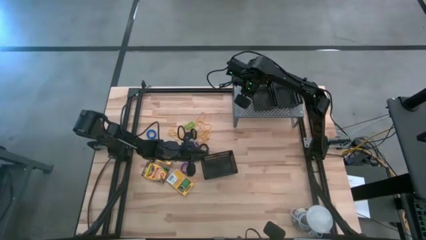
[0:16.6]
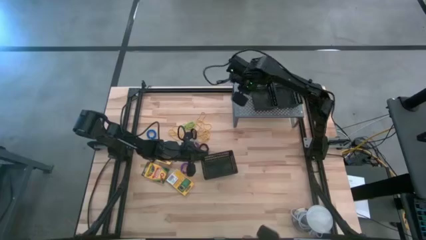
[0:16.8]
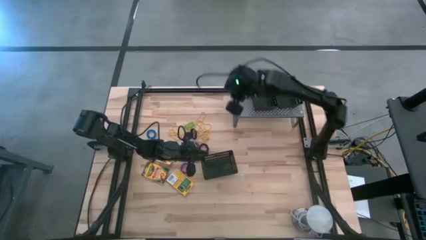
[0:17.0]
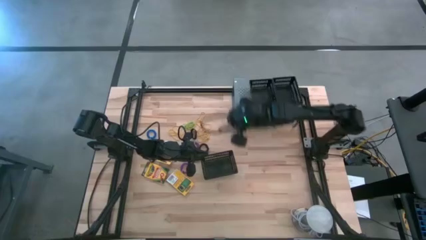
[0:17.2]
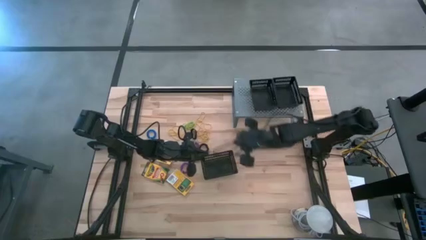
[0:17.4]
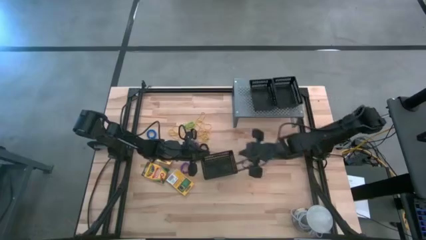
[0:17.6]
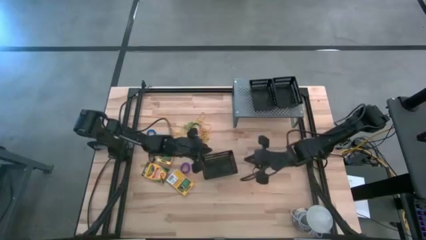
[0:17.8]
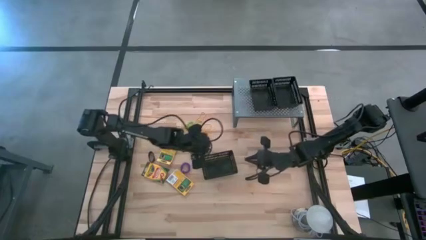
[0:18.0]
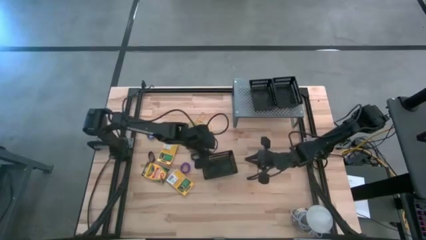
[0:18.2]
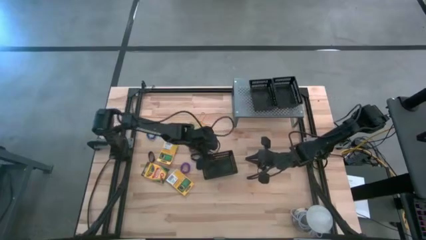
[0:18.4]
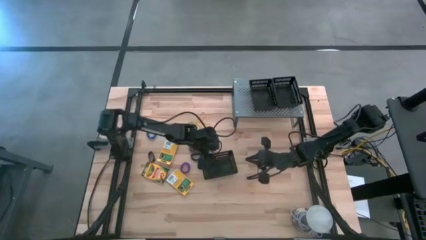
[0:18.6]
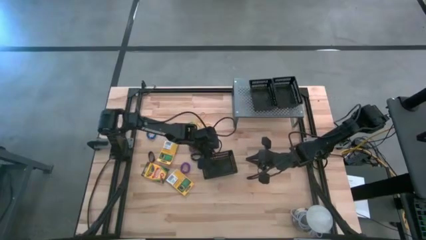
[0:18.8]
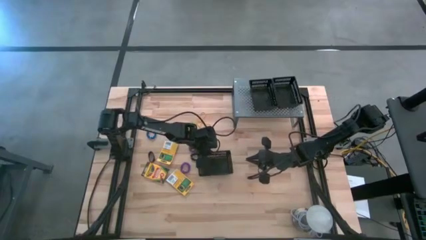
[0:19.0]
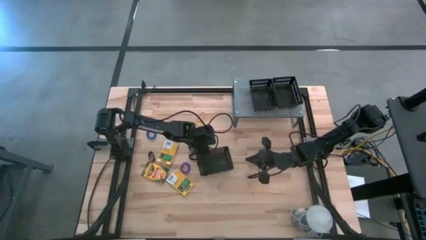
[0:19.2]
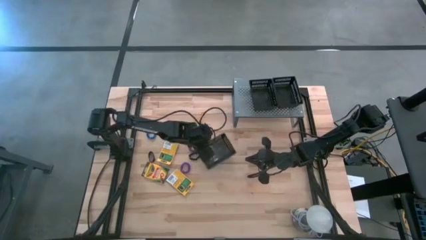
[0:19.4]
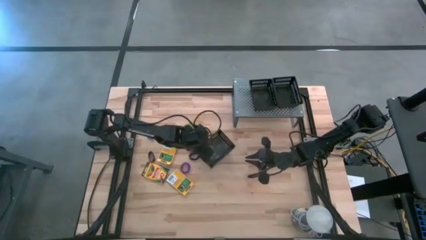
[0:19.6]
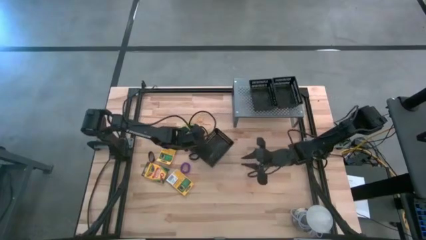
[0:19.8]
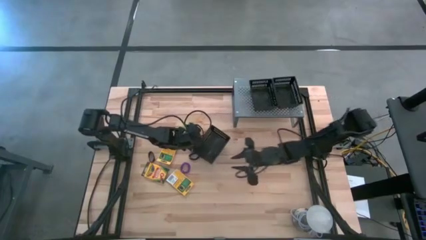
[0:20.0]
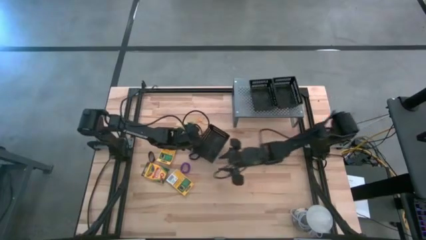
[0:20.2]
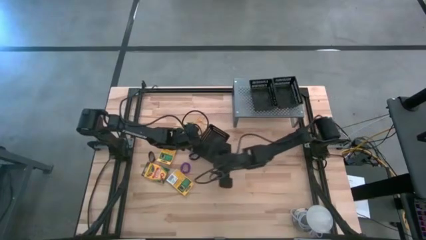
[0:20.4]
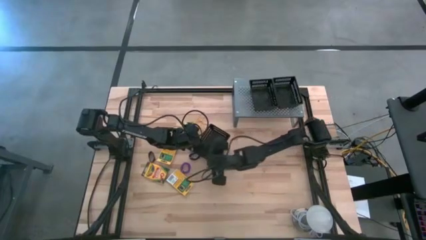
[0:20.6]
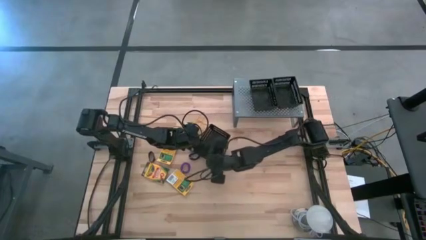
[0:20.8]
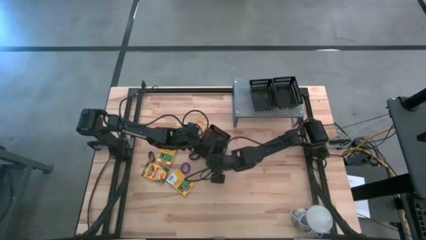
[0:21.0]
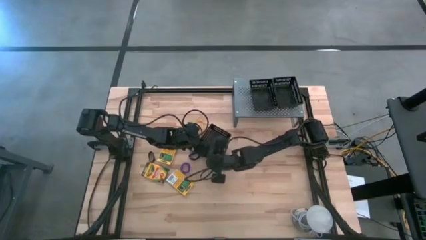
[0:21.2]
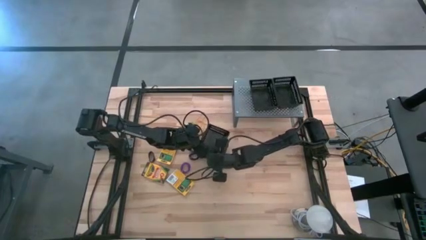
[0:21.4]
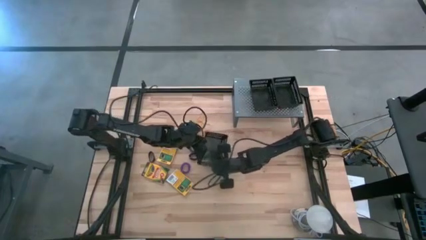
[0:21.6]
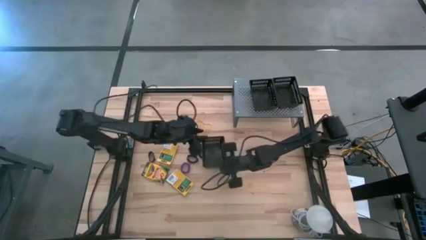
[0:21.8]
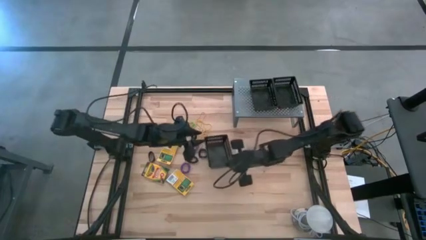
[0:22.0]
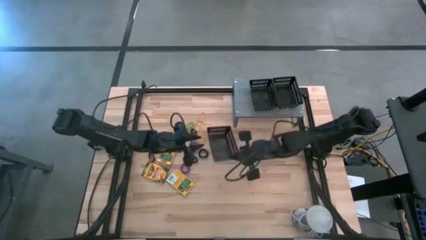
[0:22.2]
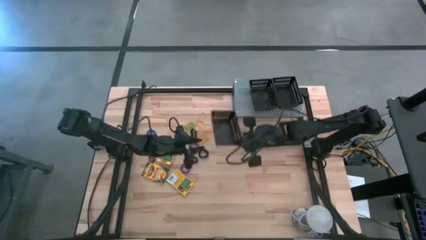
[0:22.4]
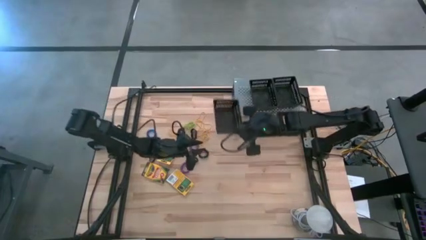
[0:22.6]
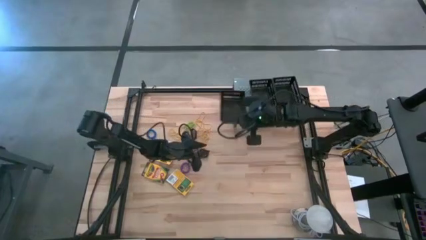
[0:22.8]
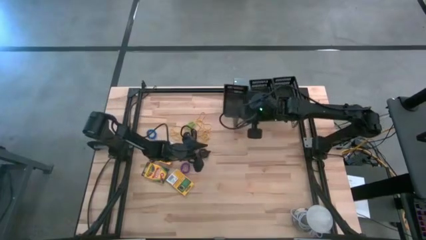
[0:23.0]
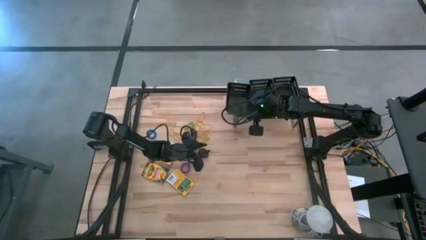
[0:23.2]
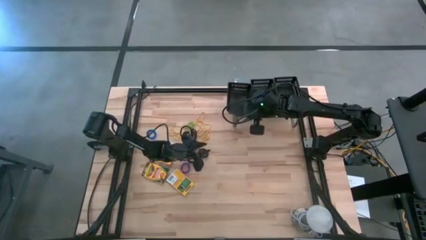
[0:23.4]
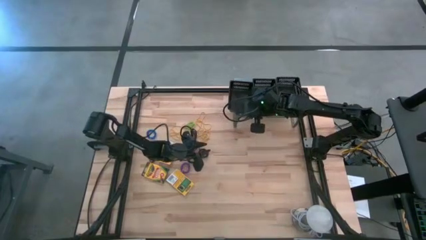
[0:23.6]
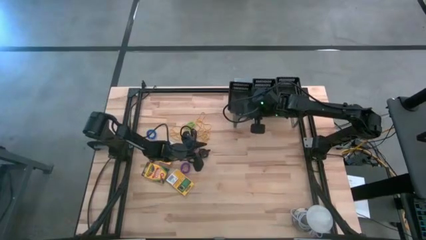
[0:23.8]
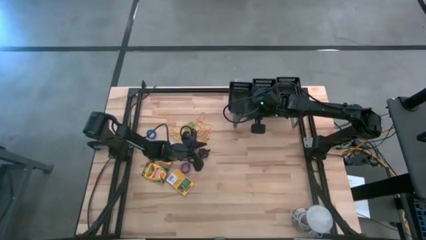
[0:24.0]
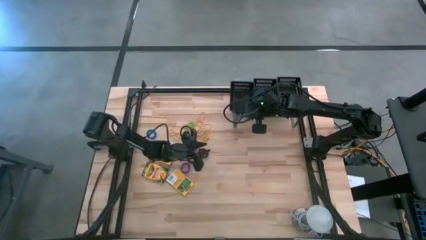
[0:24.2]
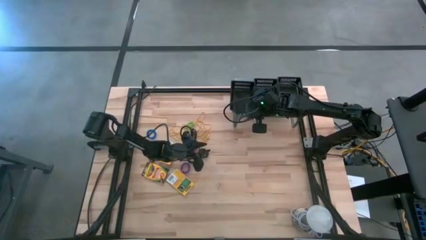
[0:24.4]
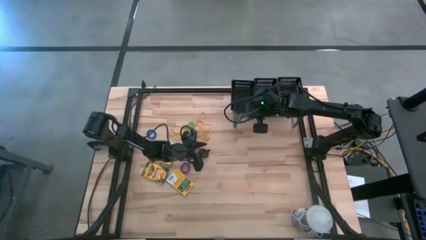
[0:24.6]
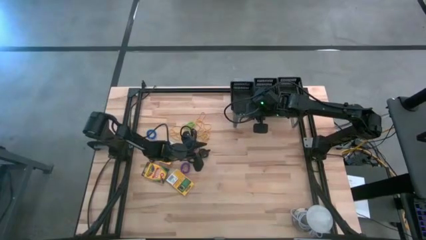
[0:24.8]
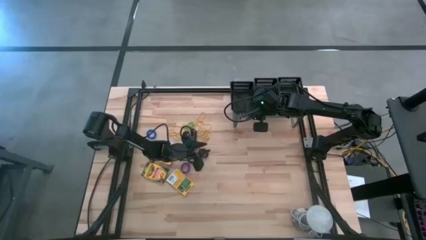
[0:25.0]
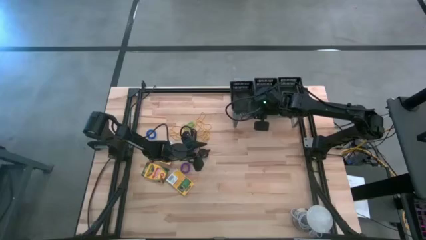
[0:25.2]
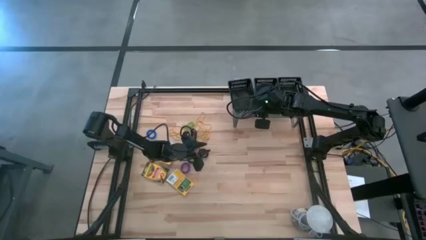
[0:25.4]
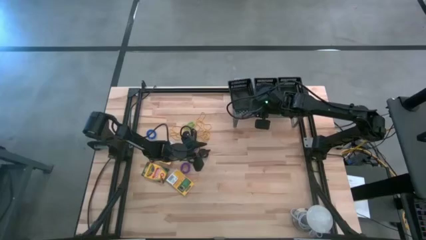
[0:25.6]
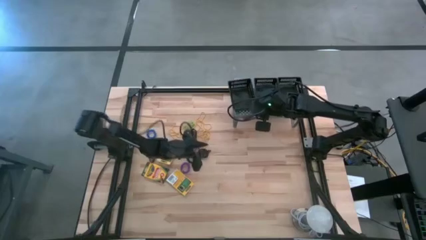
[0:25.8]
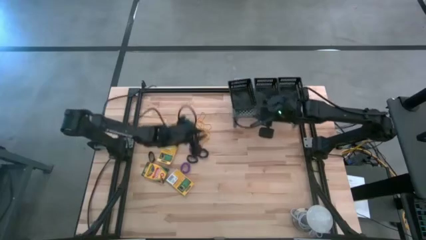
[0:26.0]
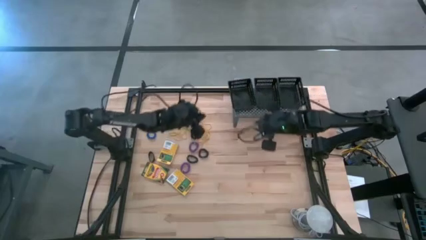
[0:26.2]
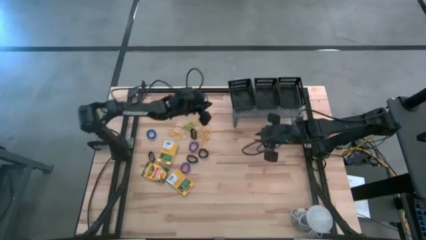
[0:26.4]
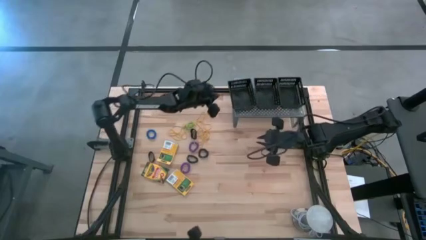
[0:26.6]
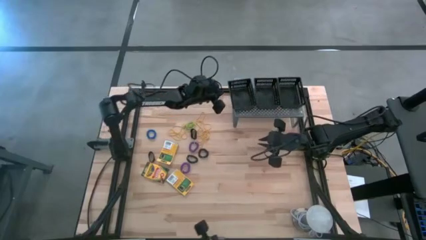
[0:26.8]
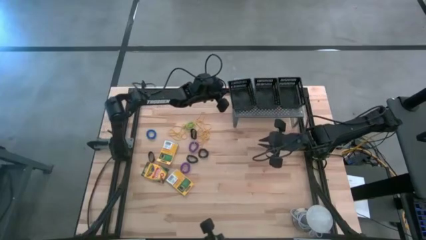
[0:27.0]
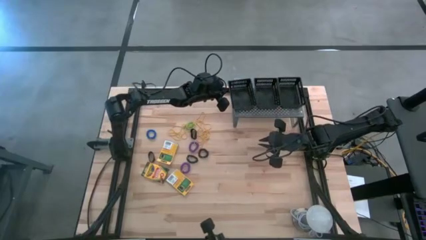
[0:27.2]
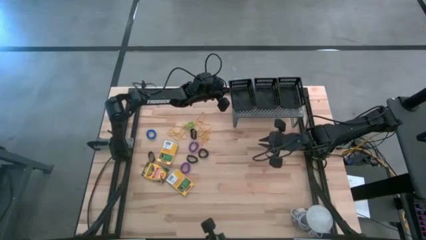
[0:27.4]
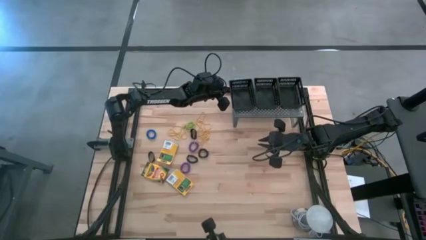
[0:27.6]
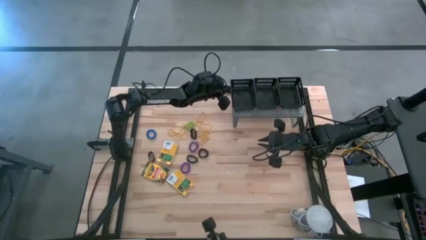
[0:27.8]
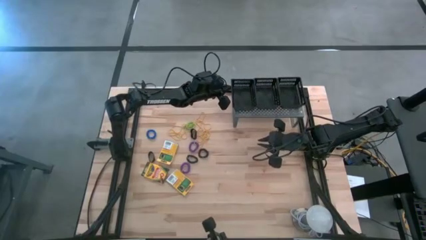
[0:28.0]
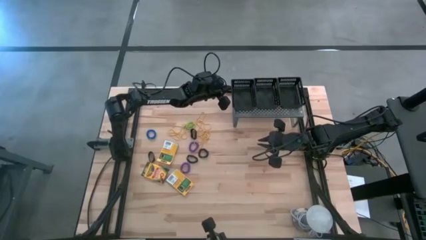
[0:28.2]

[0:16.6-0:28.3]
Task: Pick & Place Office Desk Supplies
Put the black basket on the shelf

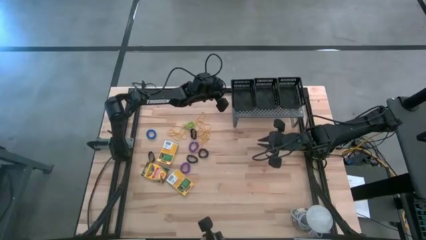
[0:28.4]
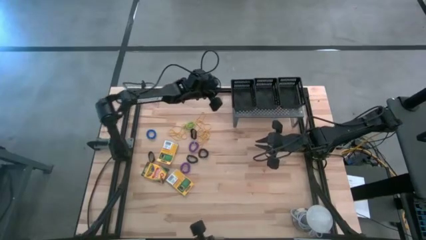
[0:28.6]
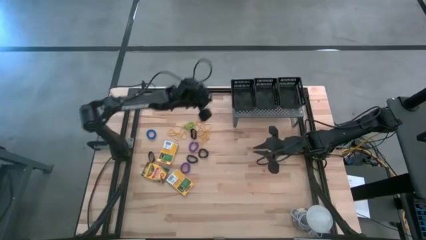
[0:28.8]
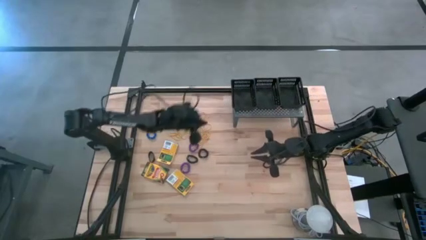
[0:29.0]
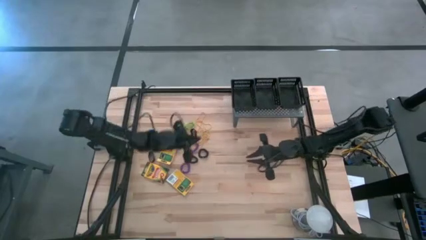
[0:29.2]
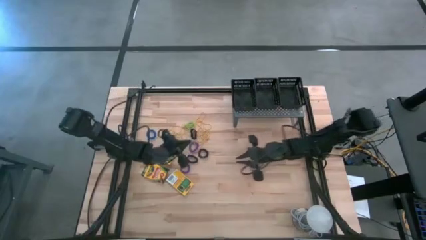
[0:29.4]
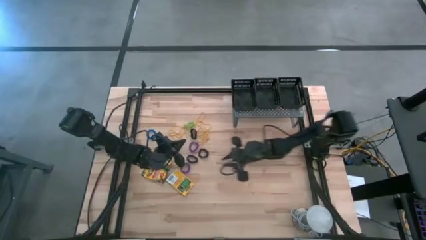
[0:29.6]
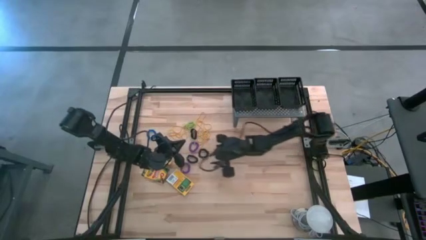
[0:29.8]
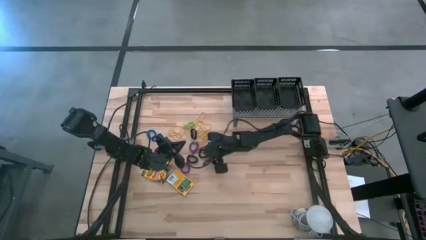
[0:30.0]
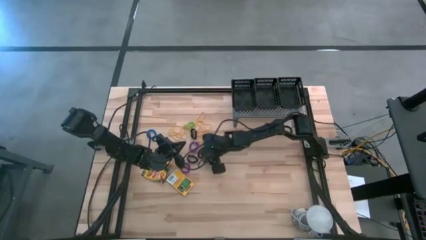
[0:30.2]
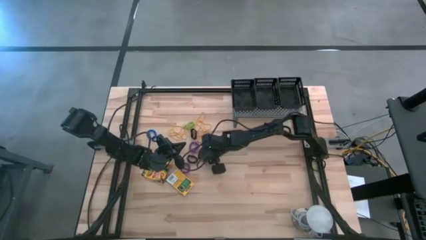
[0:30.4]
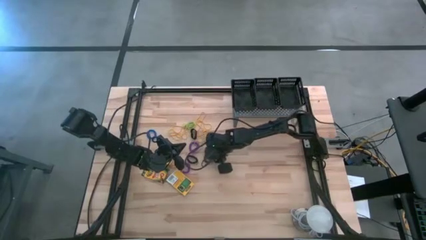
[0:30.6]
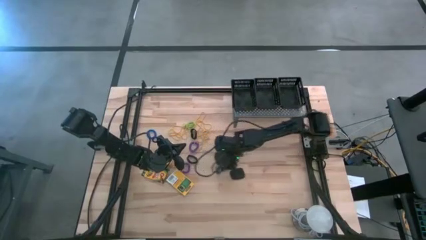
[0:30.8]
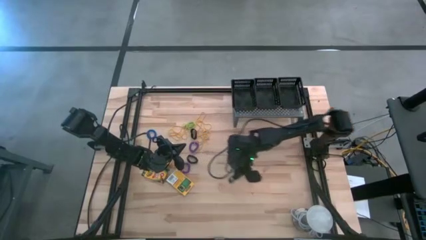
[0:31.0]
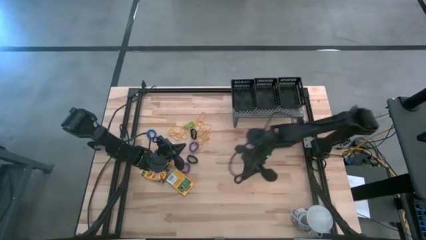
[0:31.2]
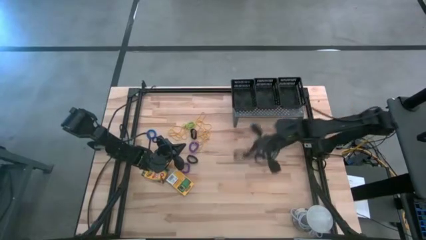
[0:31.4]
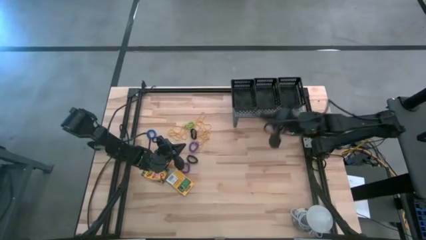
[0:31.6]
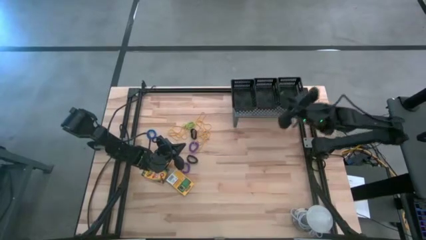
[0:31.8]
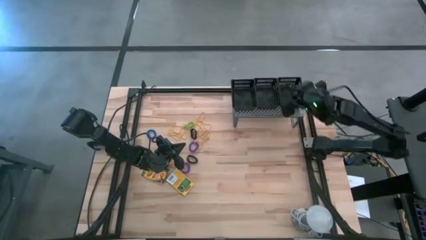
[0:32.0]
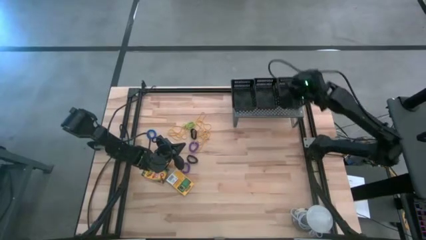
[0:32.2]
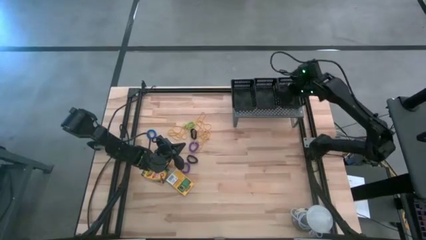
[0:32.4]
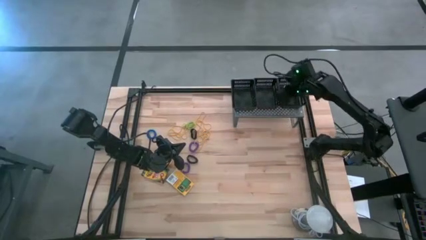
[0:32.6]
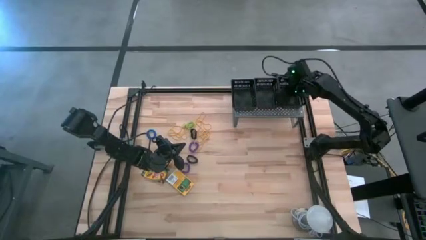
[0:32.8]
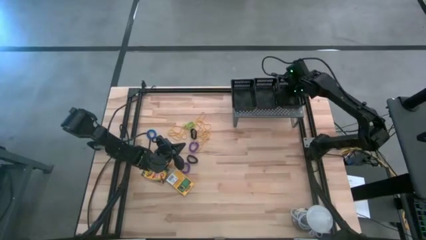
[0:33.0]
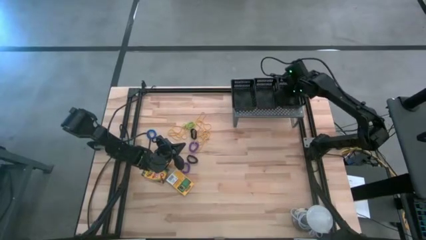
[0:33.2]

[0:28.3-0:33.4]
Put the black spring keychain into the right black basket on the shelf
